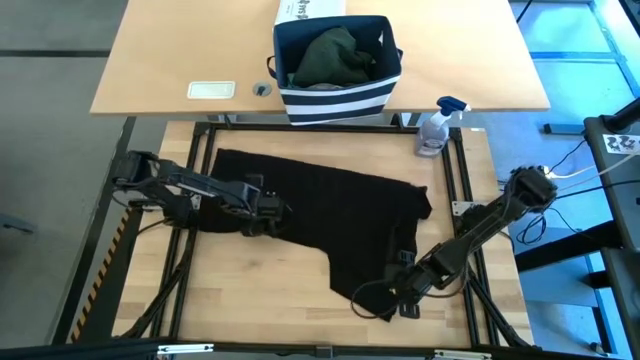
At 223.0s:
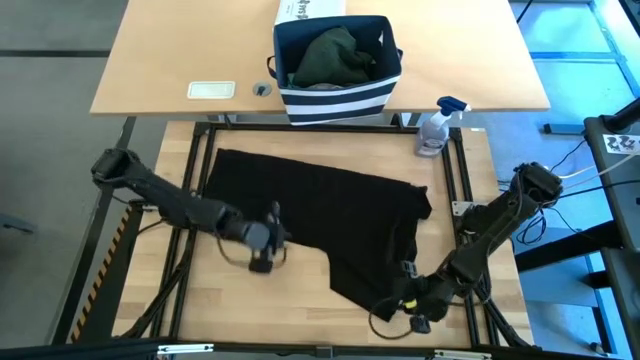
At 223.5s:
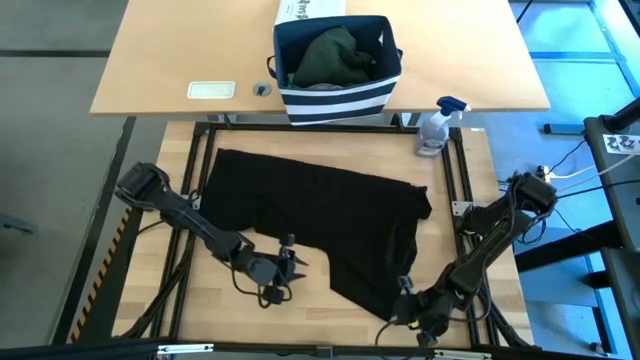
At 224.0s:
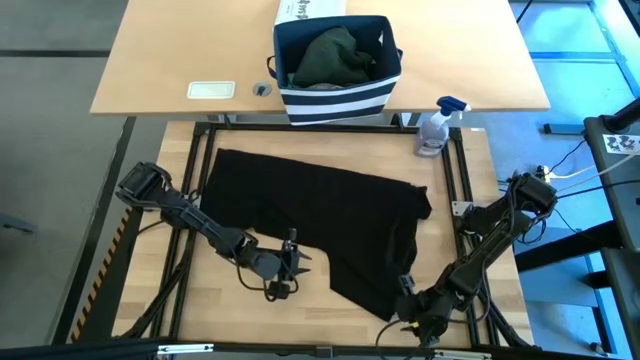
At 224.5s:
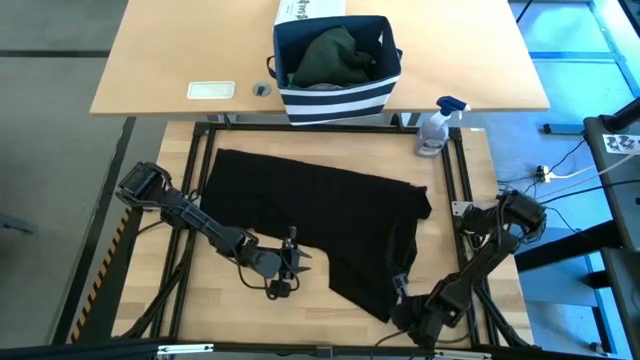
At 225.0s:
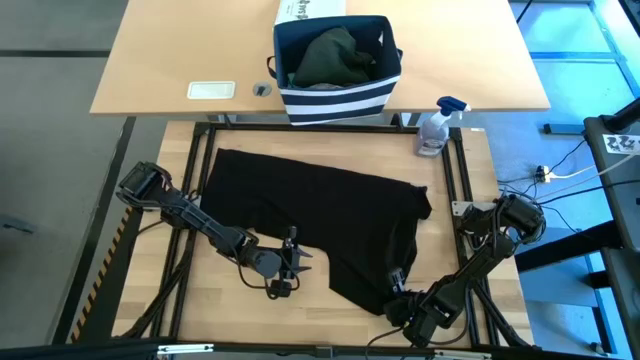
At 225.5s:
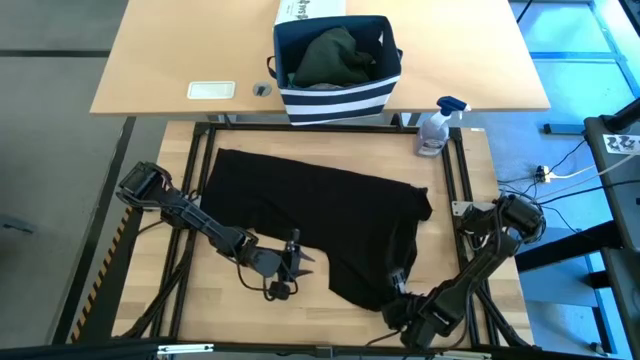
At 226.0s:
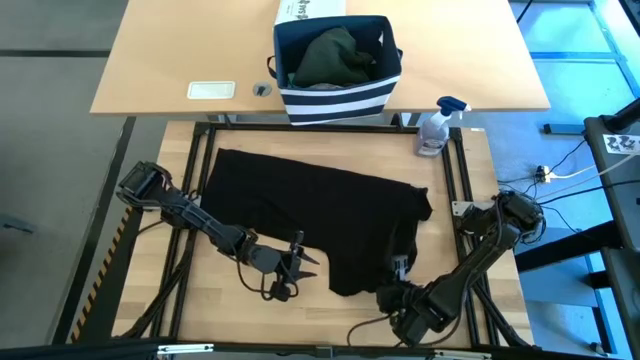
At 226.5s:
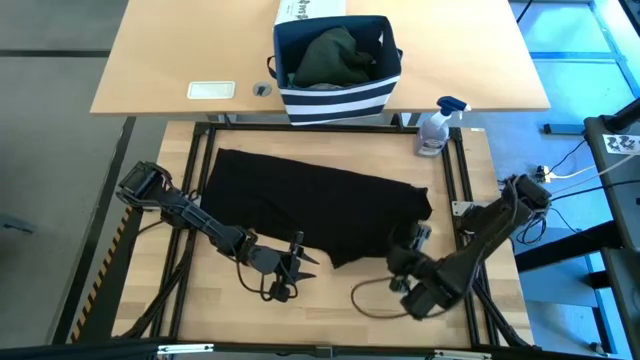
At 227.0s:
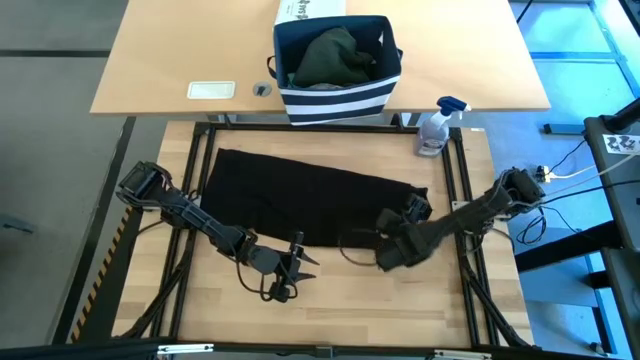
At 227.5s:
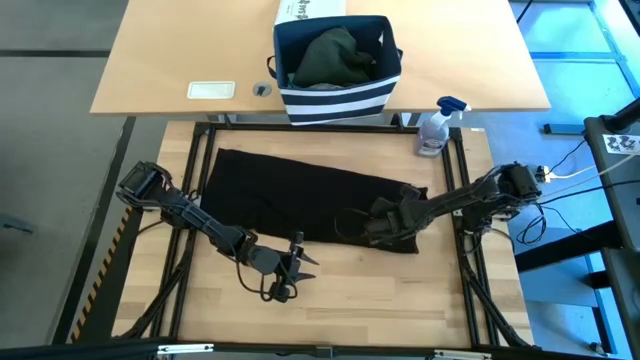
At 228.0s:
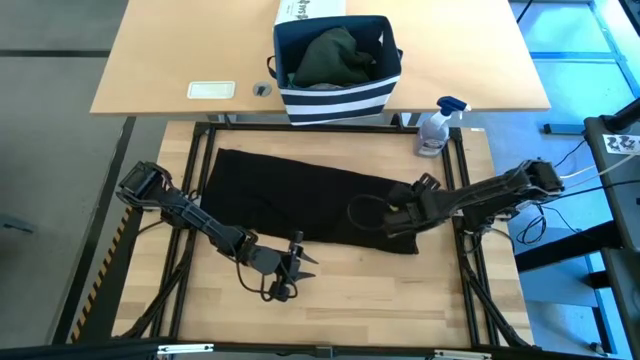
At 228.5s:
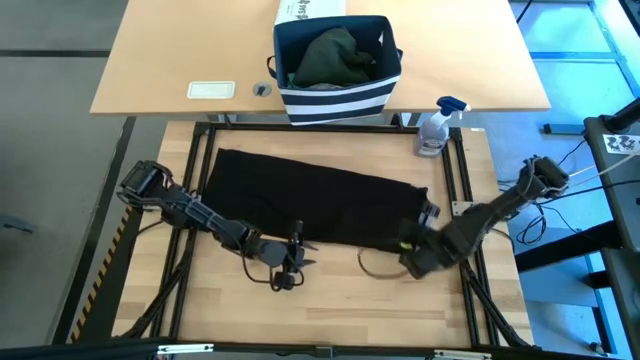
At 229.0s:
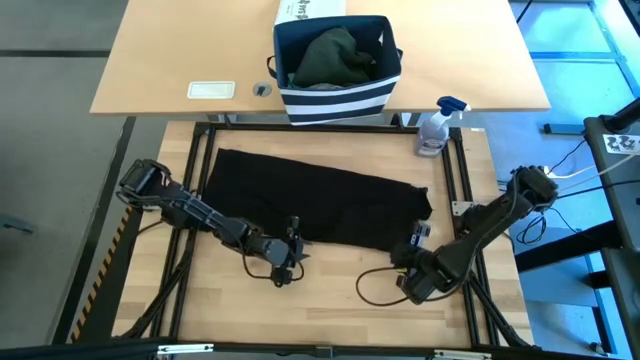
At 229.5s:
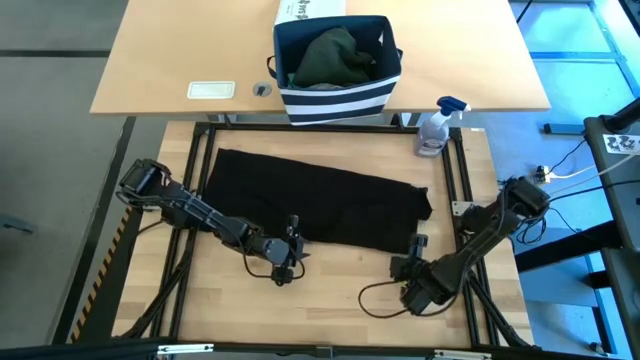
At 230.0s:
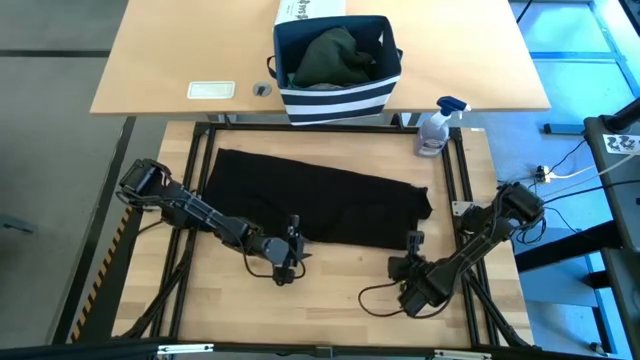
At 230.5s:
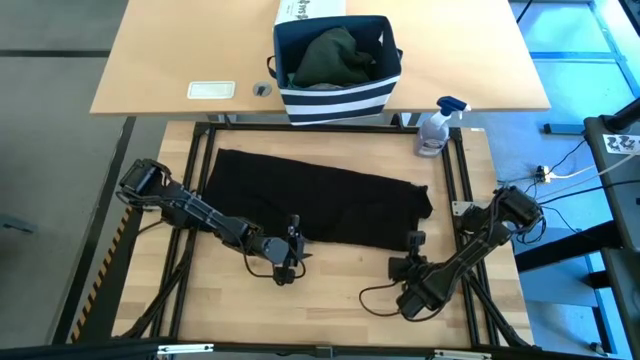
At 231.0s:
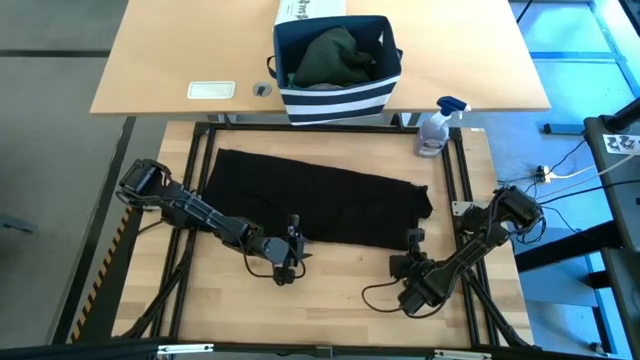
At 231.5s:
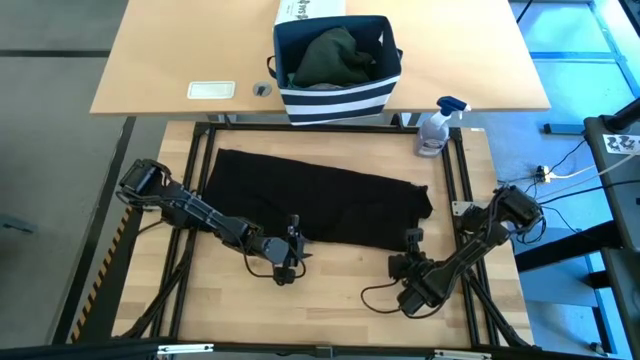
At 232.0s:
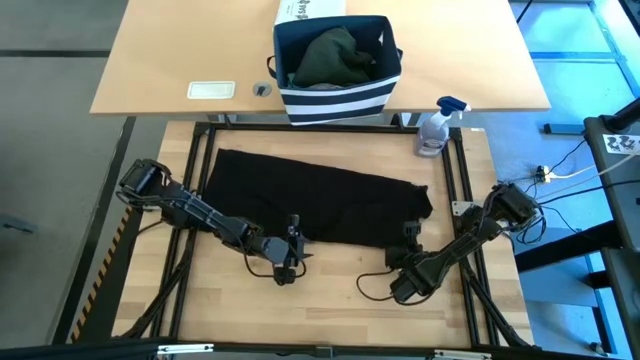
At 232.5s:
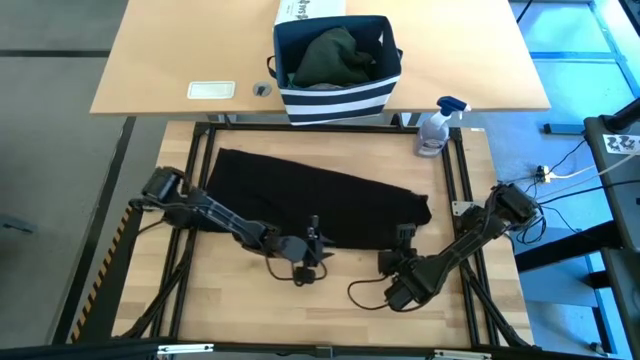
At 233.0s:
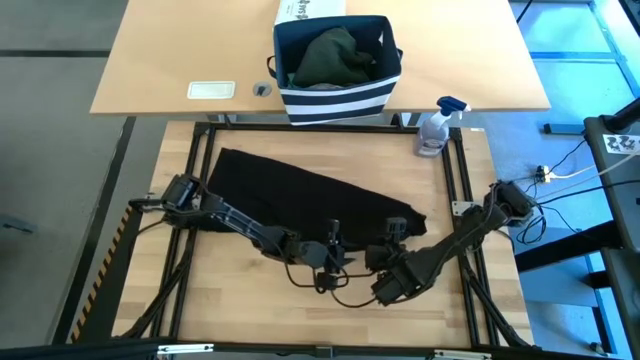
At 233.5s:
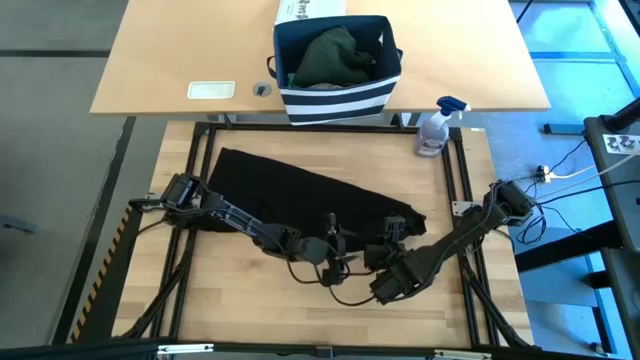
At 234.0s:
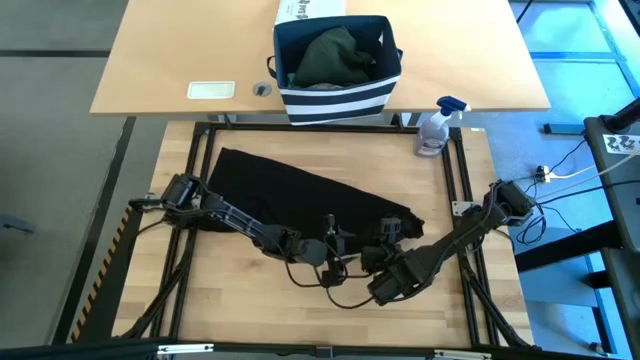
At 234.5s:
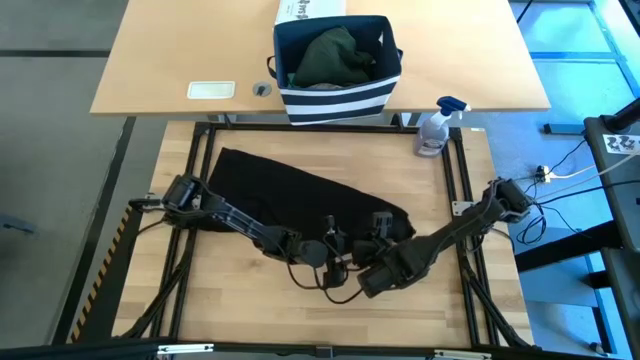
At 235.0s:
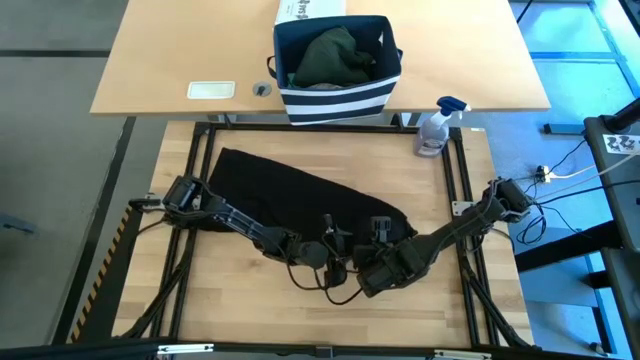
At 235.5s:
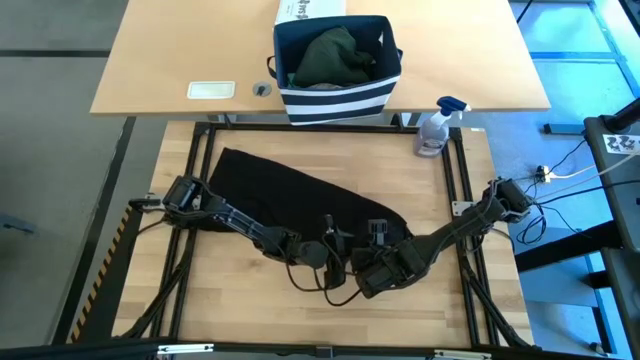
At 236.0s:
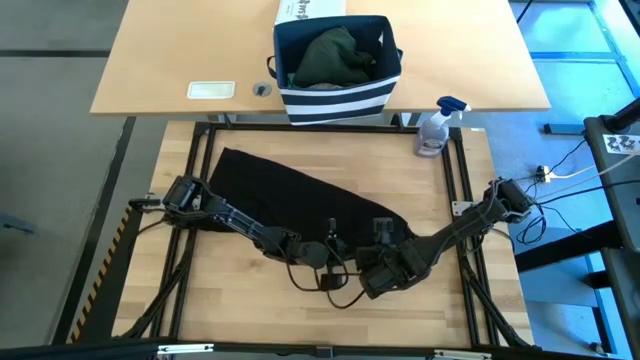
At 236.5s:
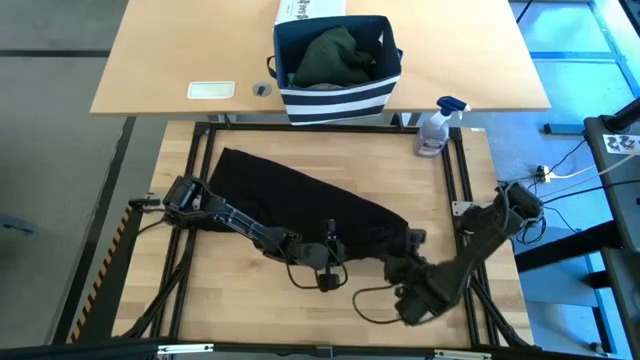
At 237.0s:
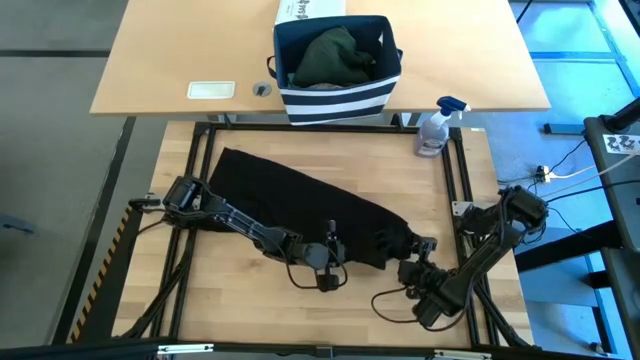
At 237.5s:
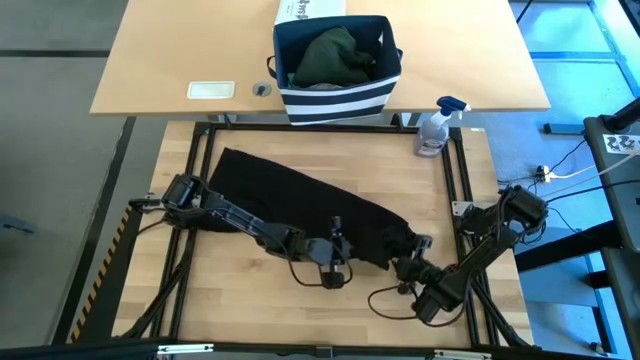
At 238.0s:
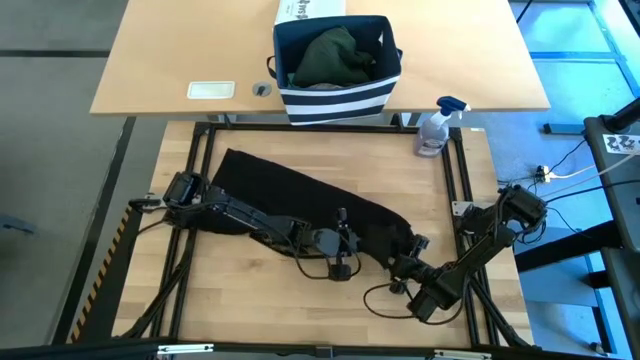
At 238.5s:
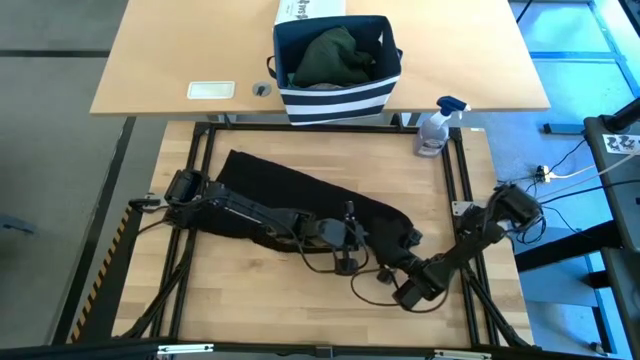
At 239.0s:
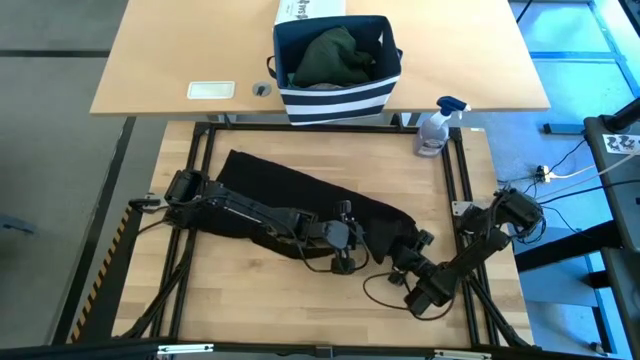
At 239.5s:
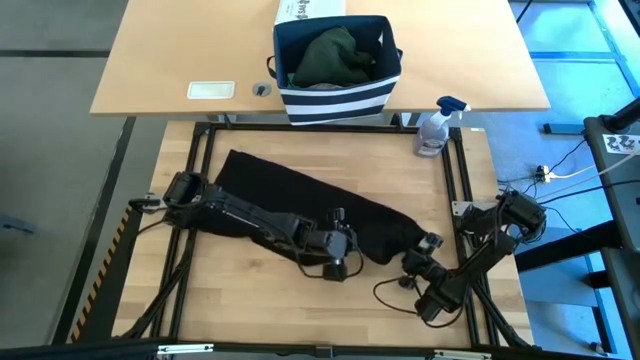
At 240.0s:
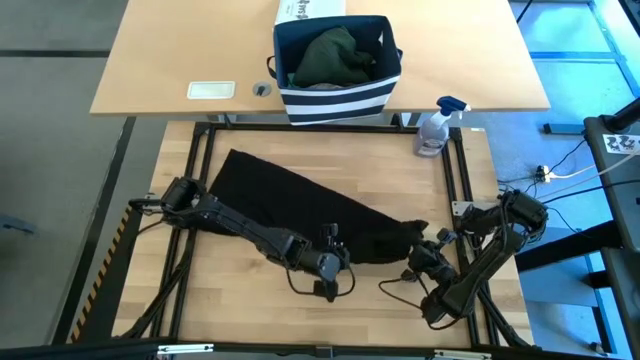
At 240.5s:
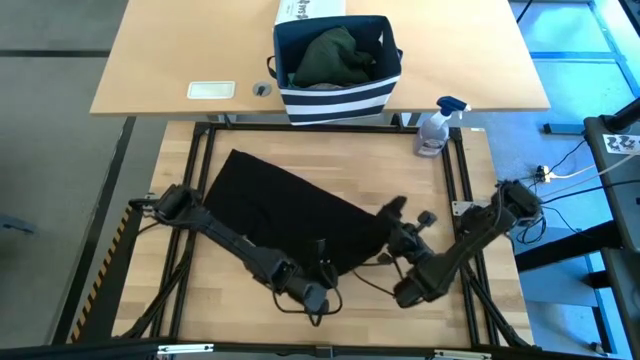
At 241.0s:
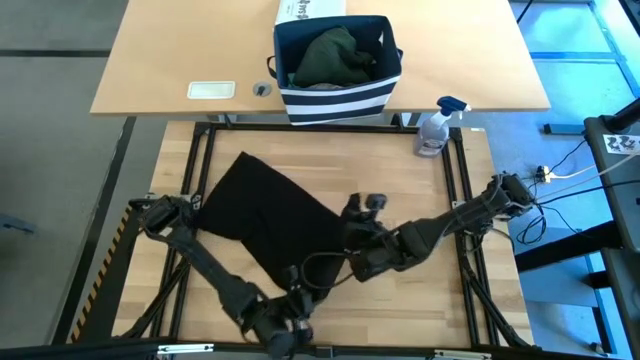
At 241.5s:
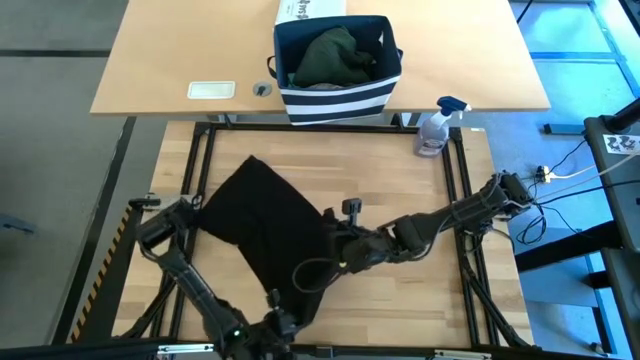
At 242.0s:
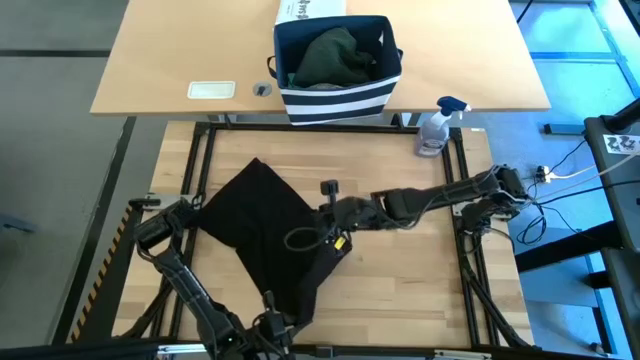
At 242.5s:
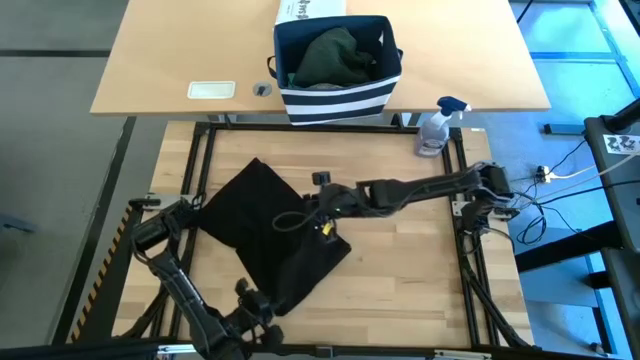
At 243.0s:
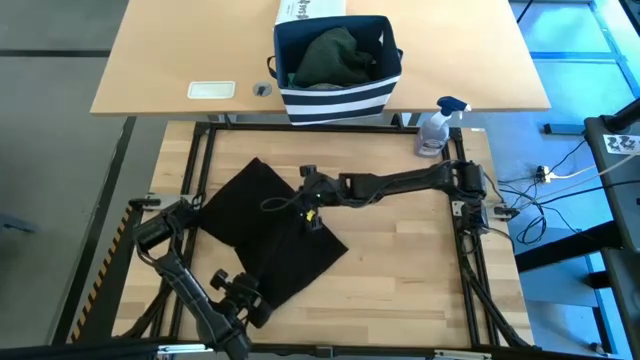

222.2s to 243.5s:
Task: Fold Laundry from Bin
Fold the black shirt
